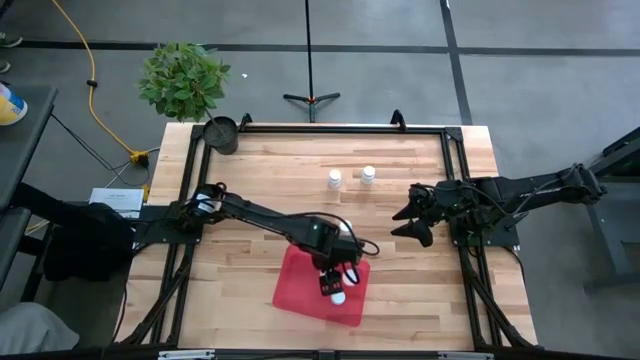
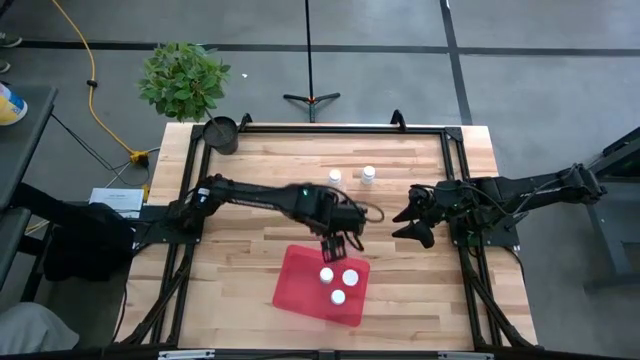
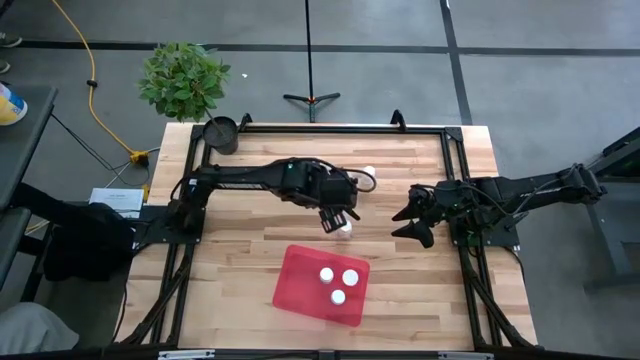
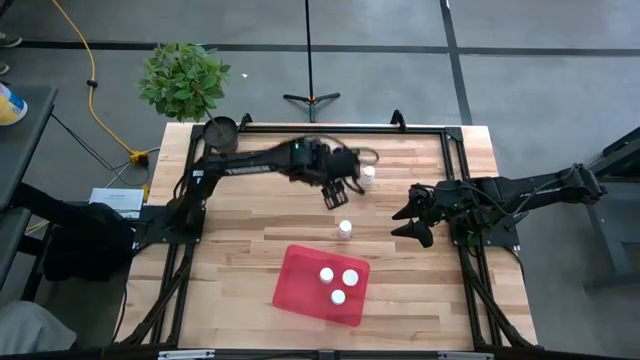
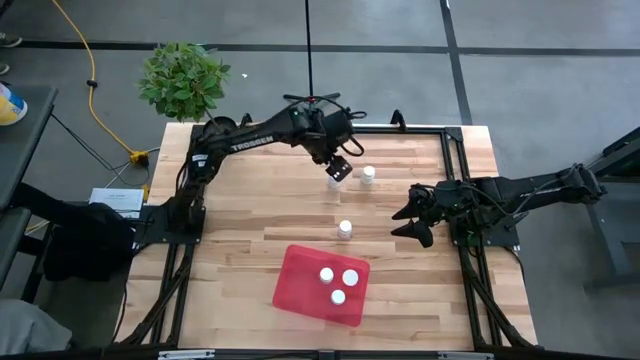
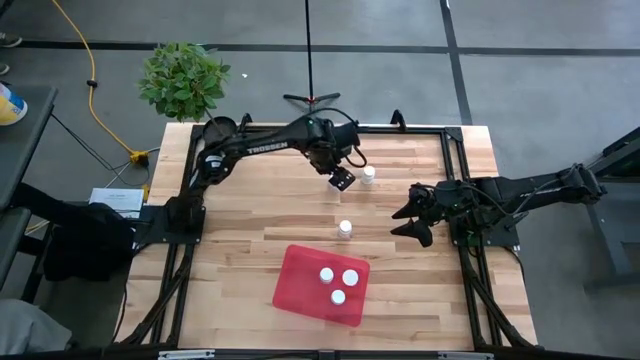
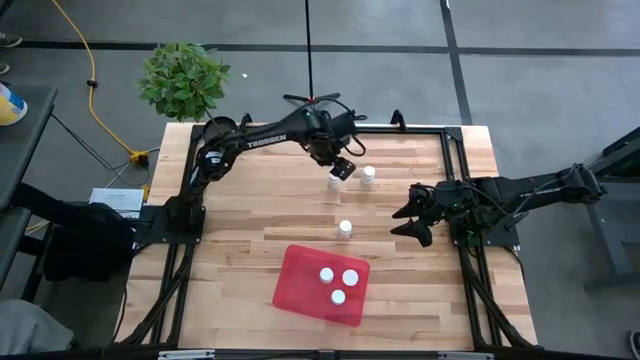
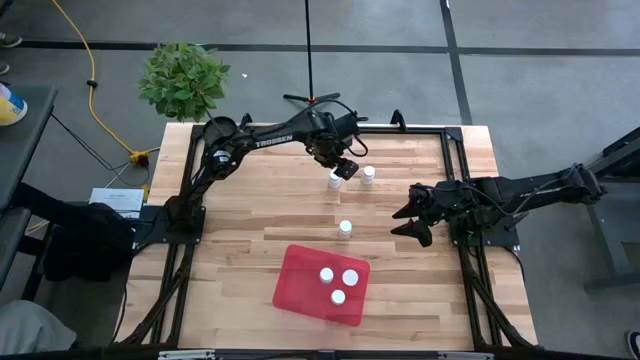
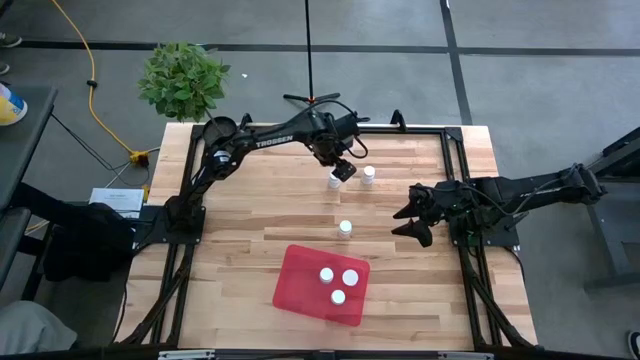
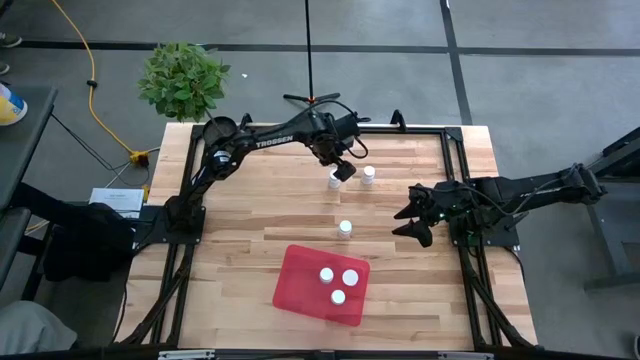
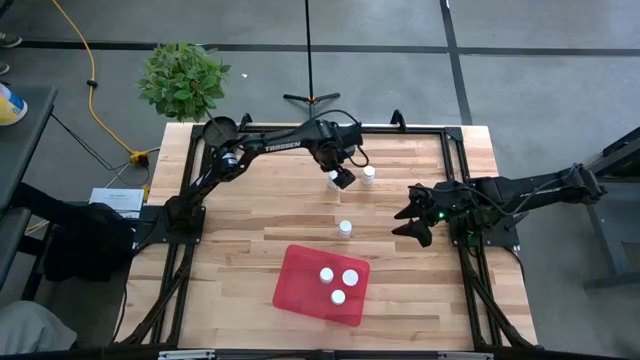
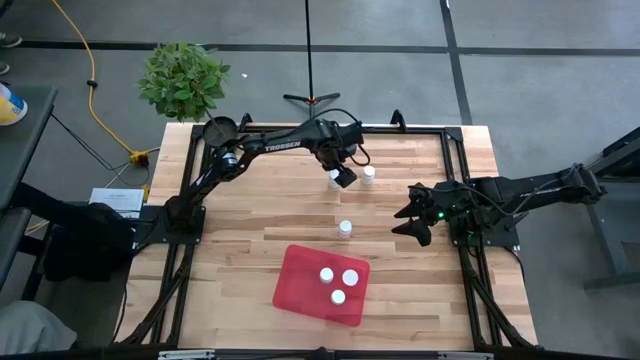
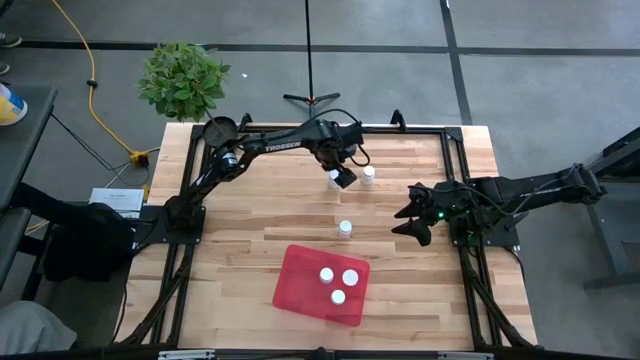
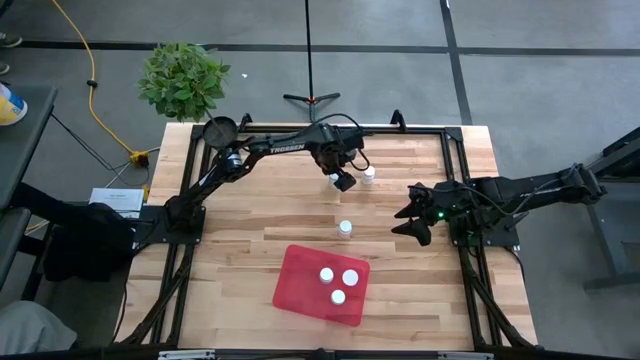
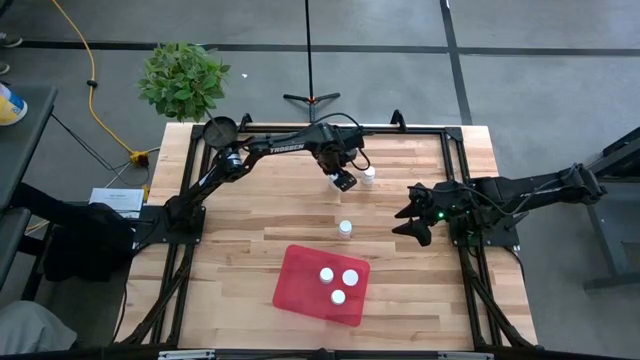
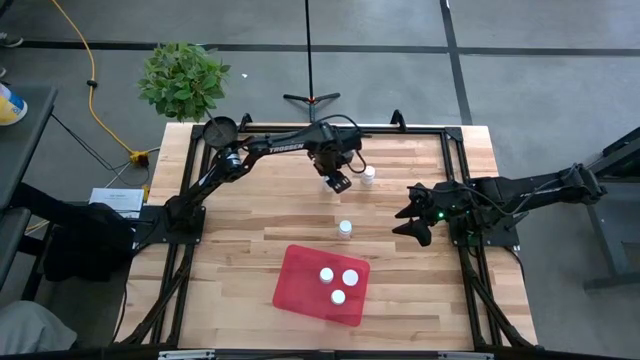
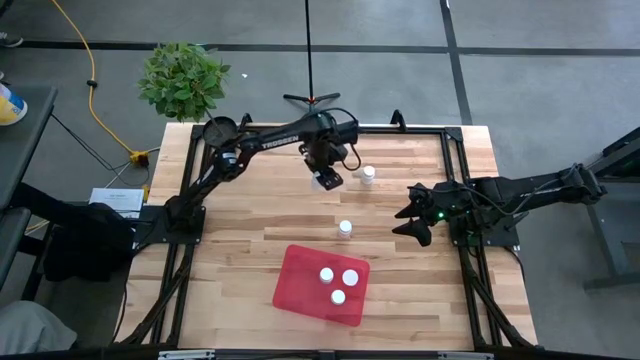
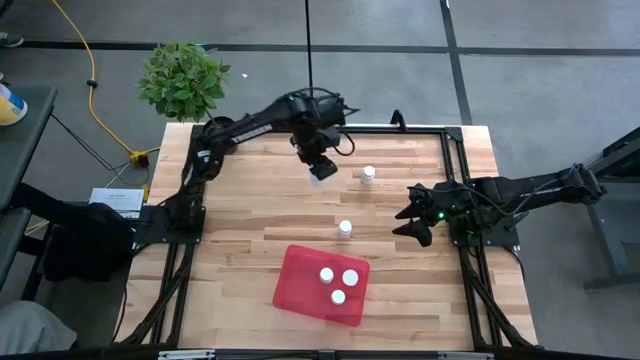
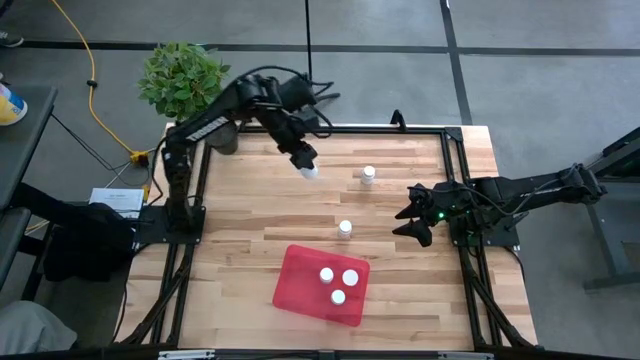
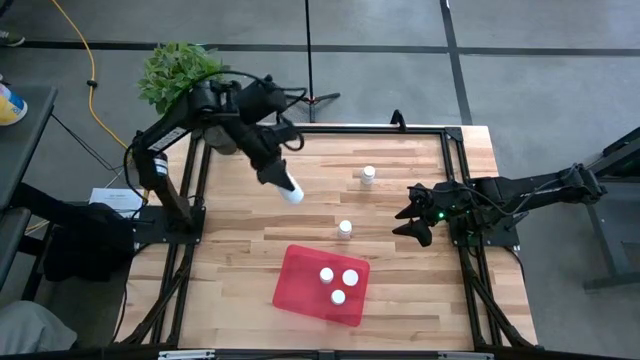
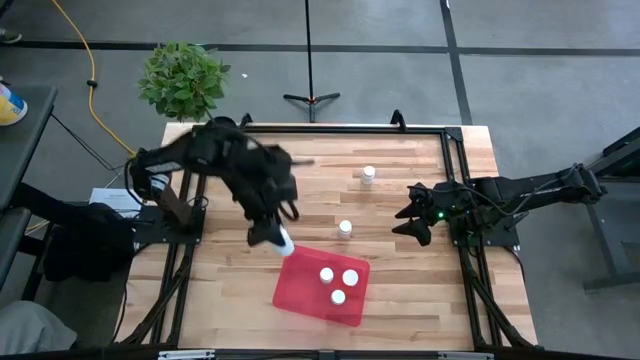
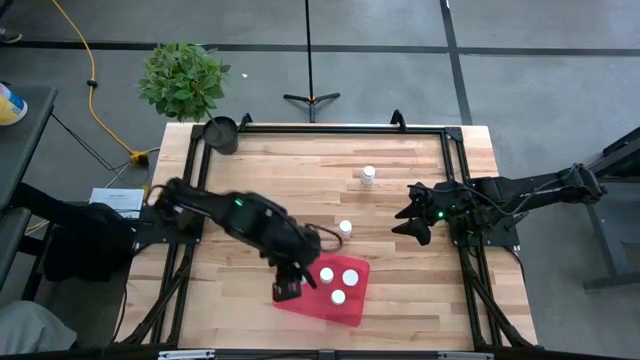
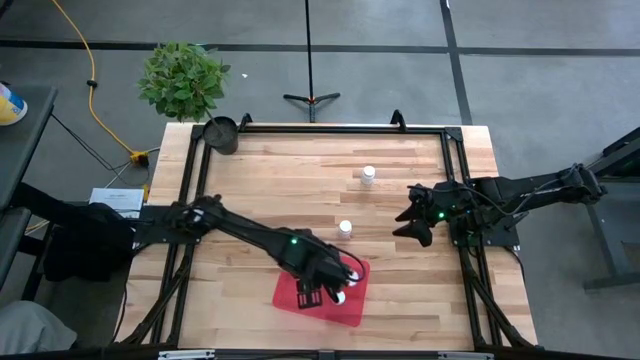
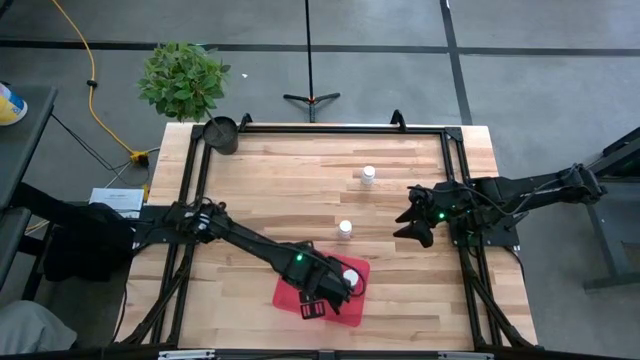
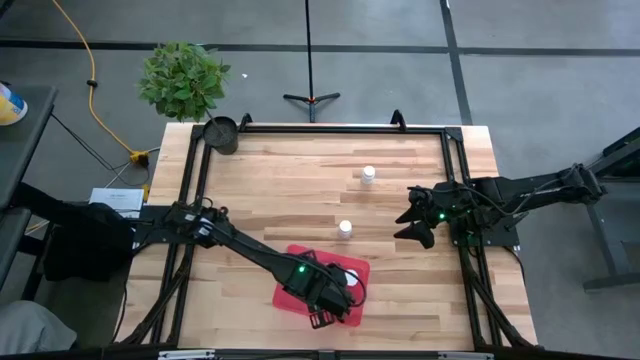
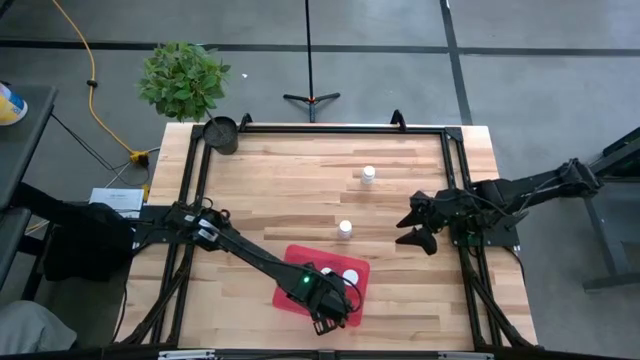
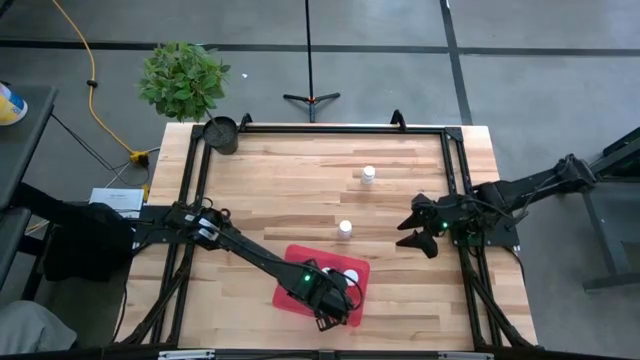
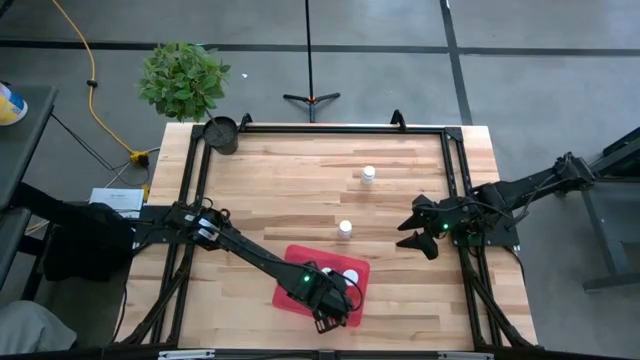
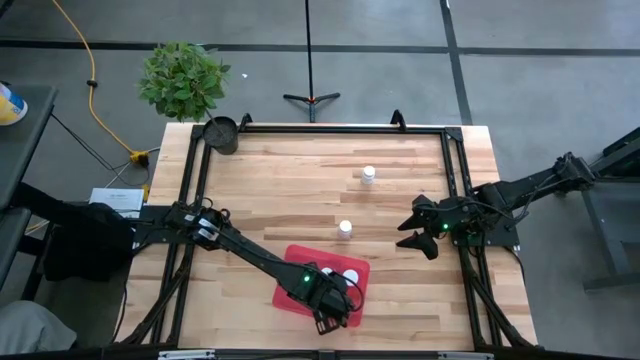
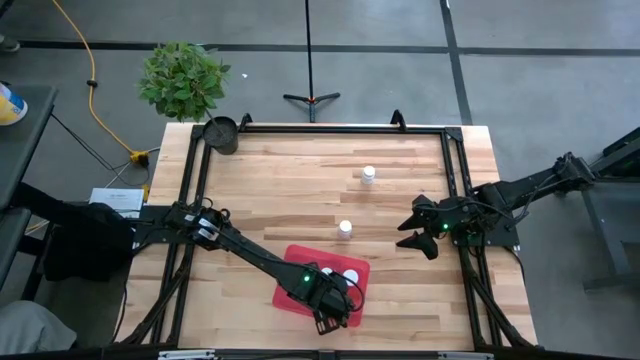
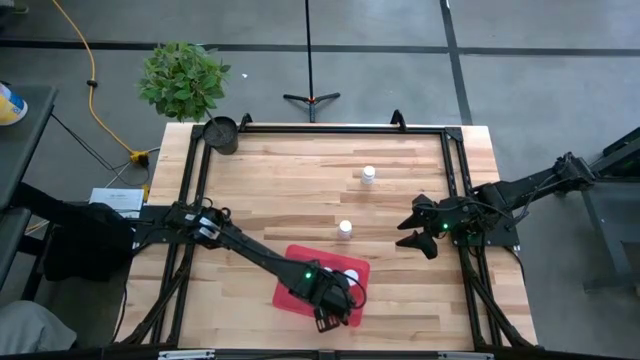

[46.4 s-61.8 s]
Task: Pick and place pill bottles into a basket
Put the white medicine bottle into the red container

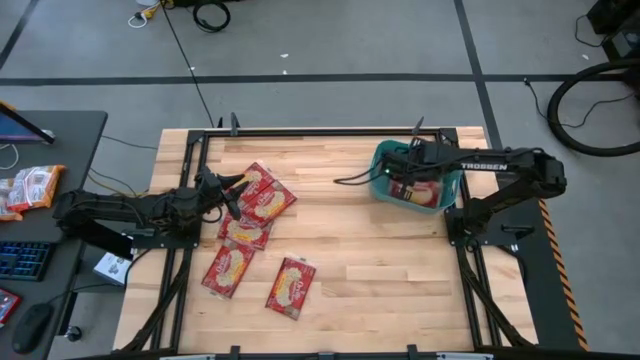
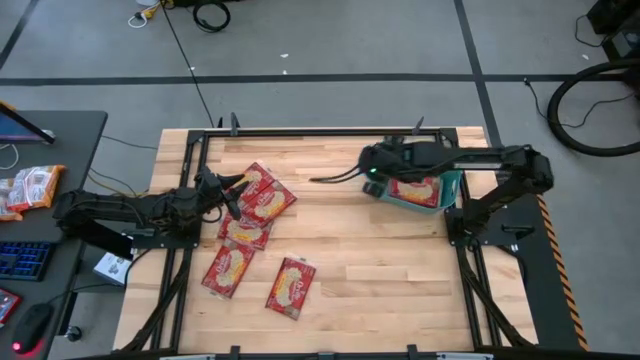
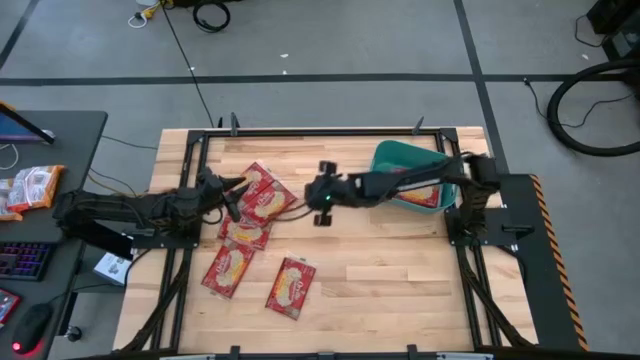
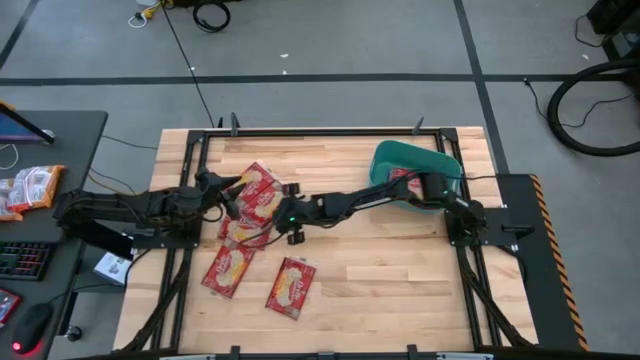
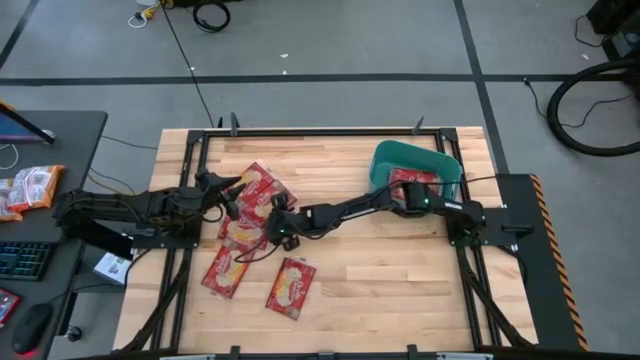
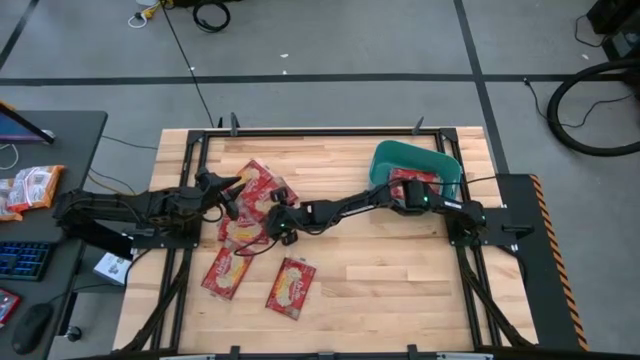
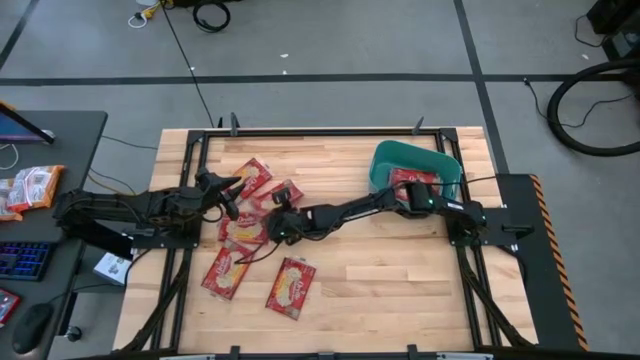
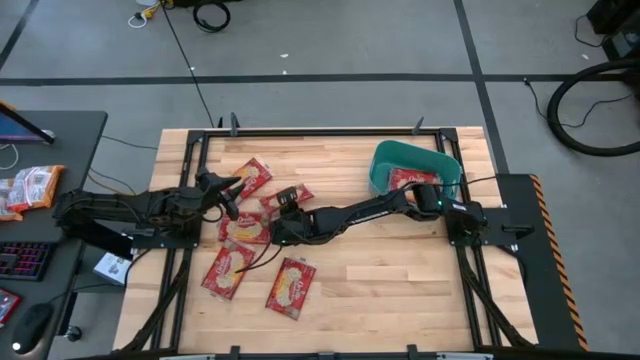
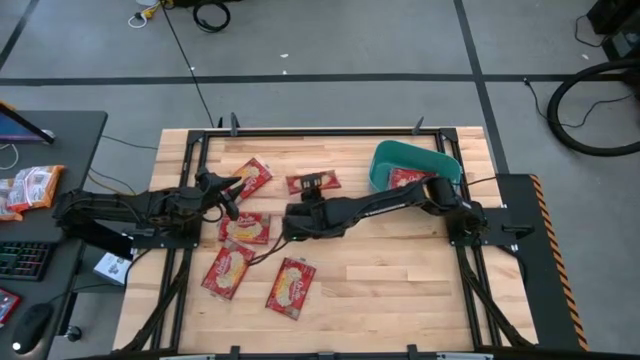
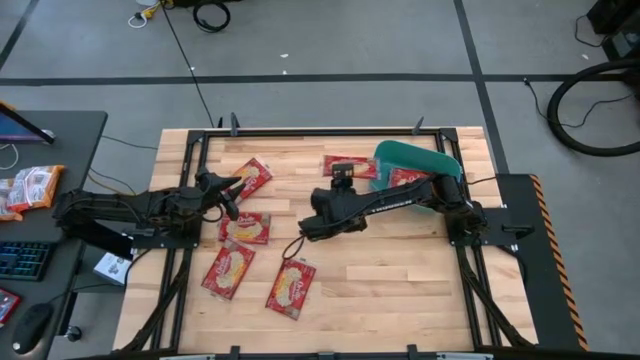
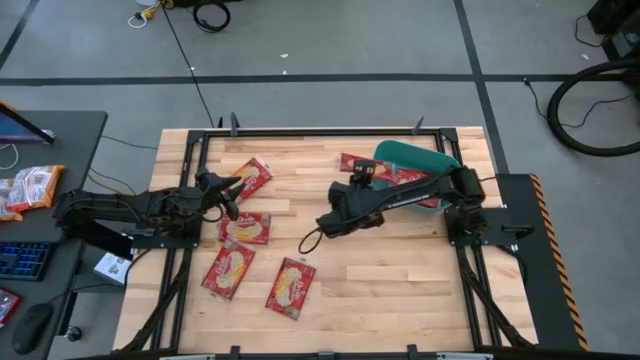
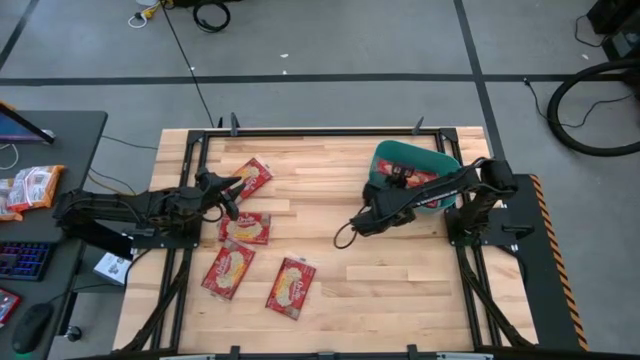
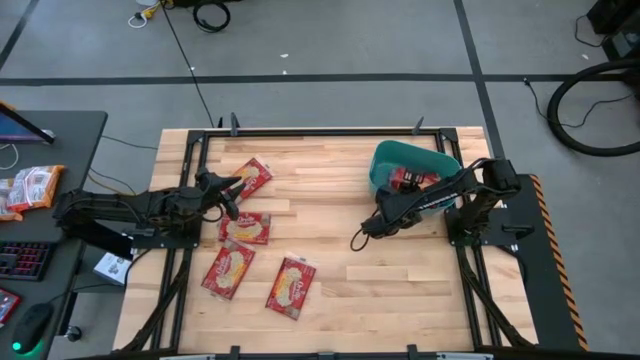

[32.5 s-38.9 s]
Task: Sort popcorn bags into baskets
Put the red popcorn bag into the green container
